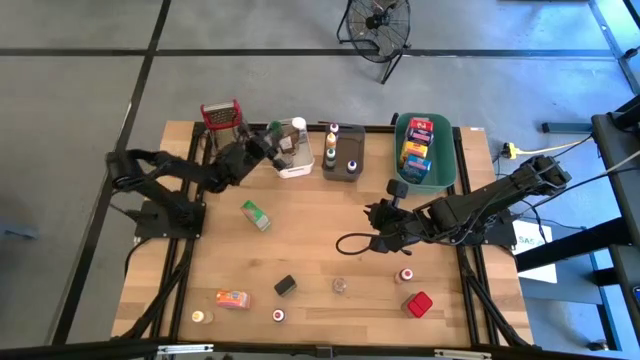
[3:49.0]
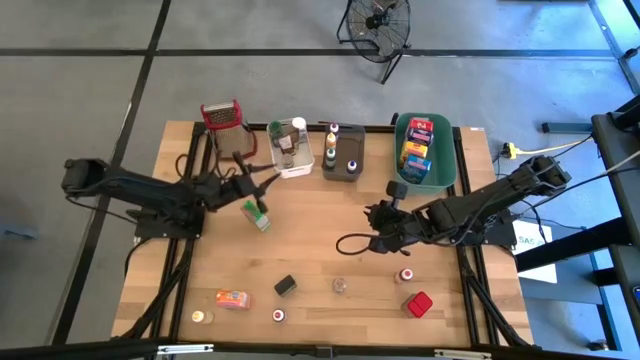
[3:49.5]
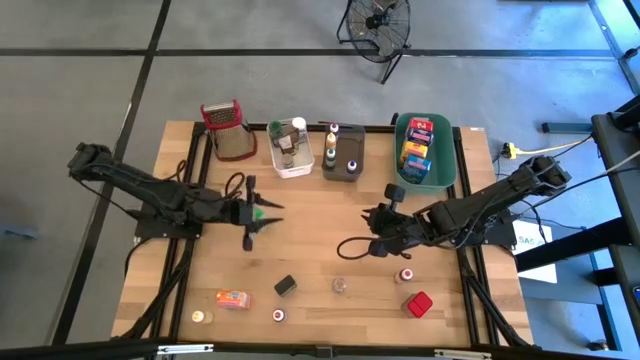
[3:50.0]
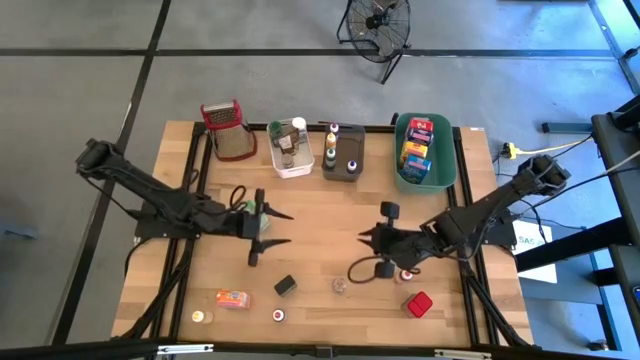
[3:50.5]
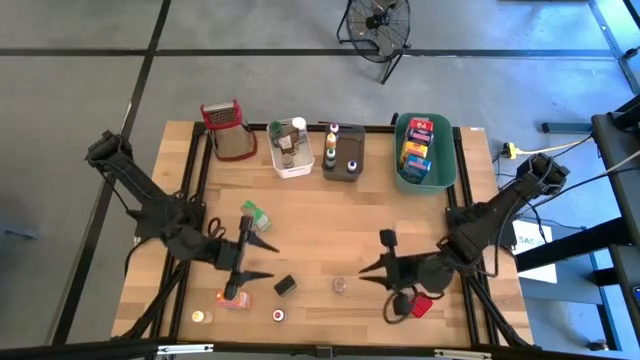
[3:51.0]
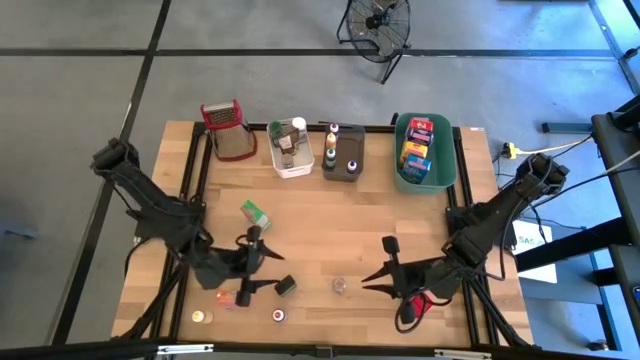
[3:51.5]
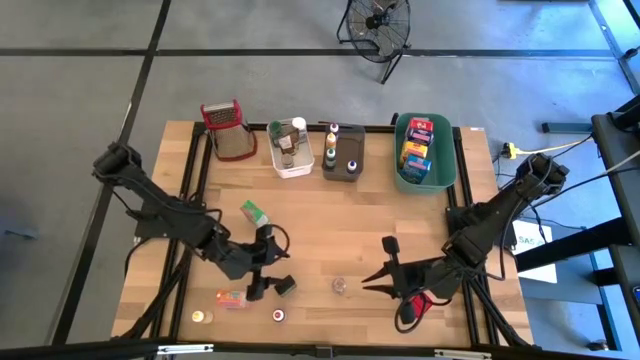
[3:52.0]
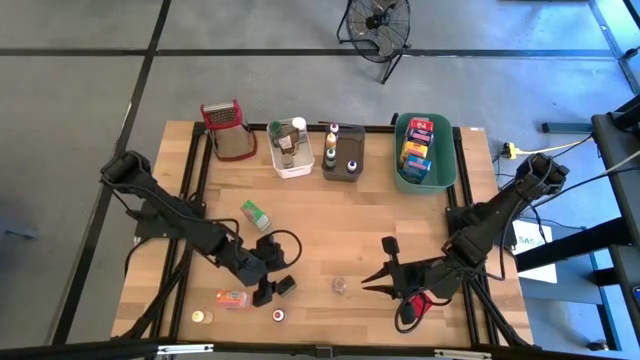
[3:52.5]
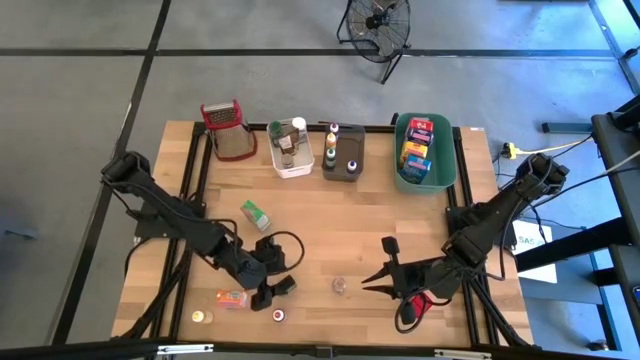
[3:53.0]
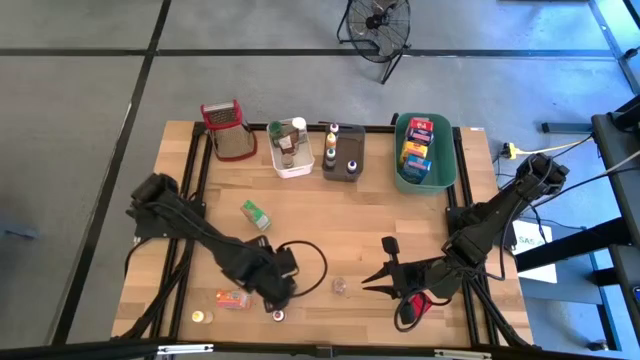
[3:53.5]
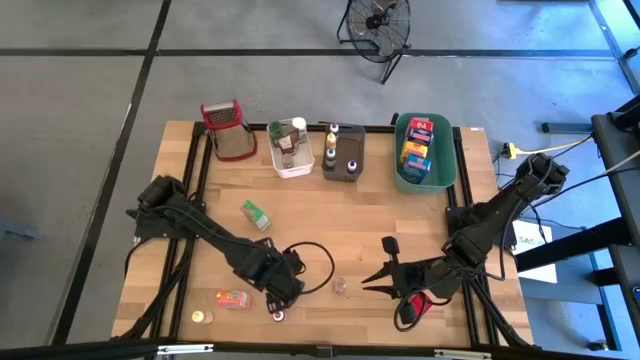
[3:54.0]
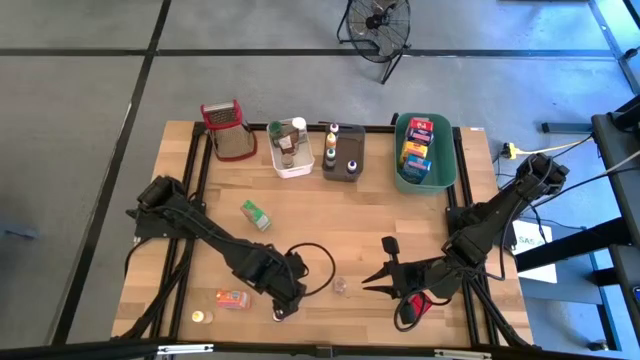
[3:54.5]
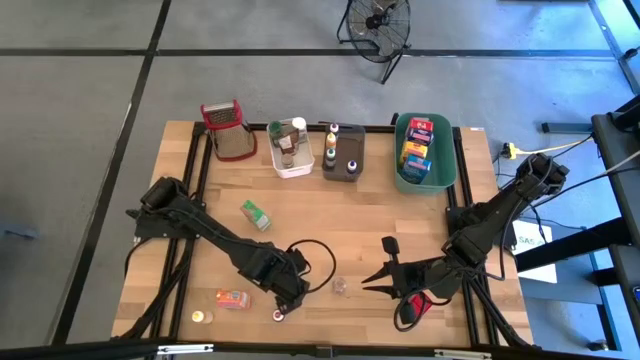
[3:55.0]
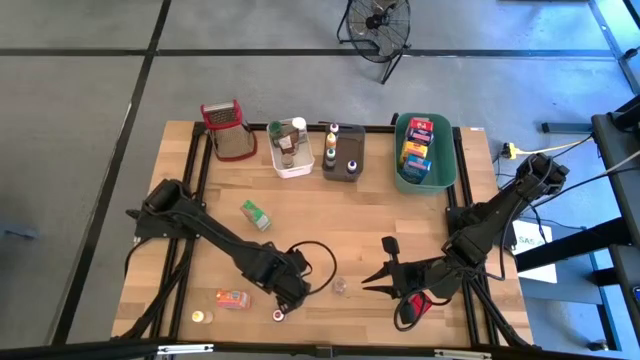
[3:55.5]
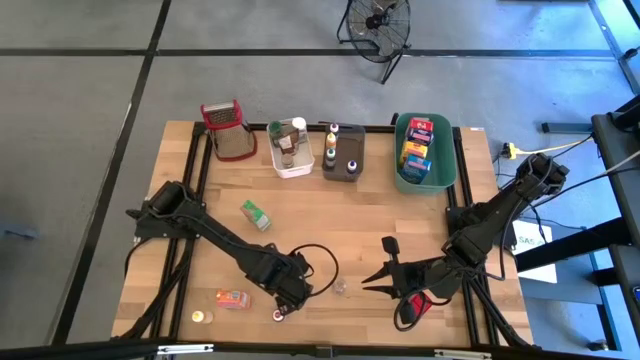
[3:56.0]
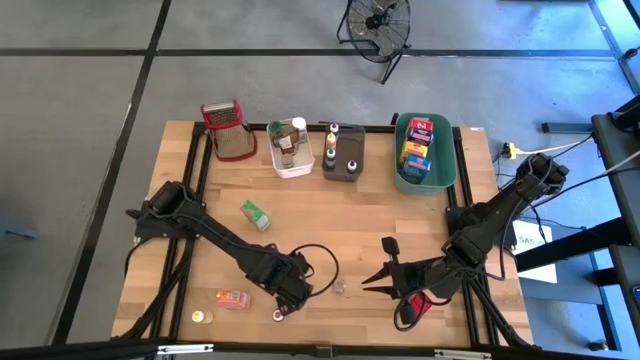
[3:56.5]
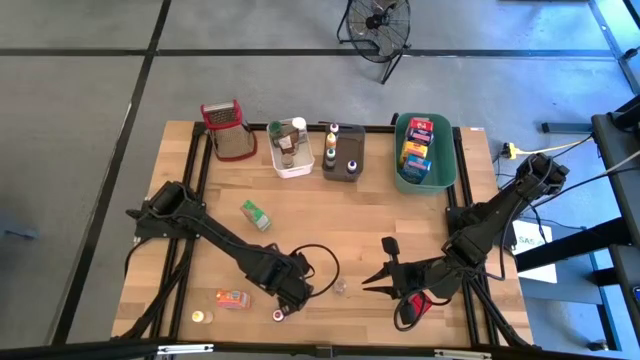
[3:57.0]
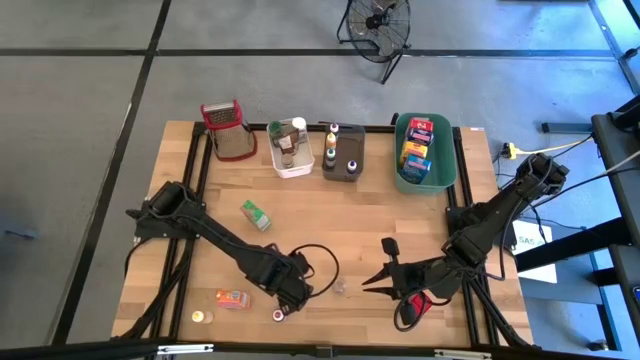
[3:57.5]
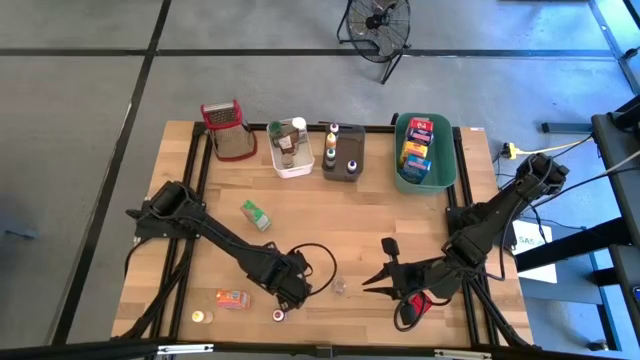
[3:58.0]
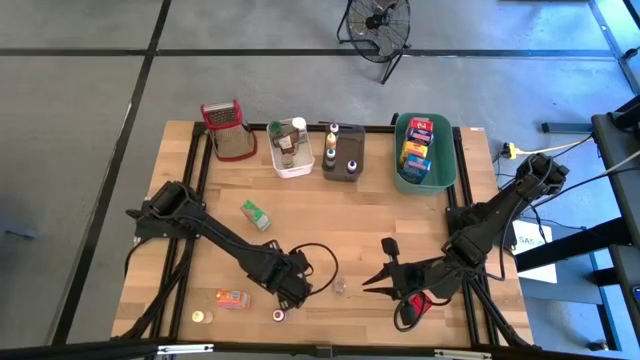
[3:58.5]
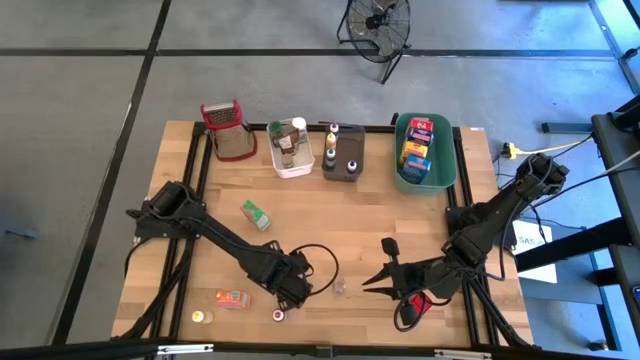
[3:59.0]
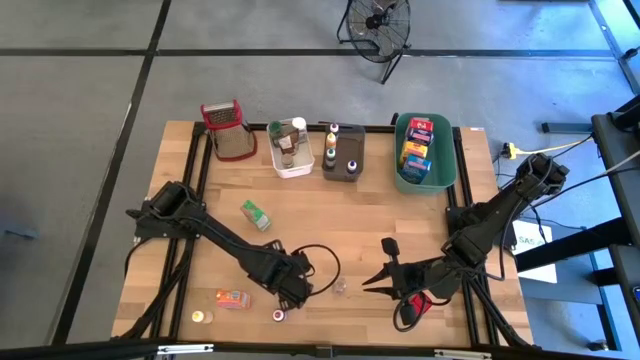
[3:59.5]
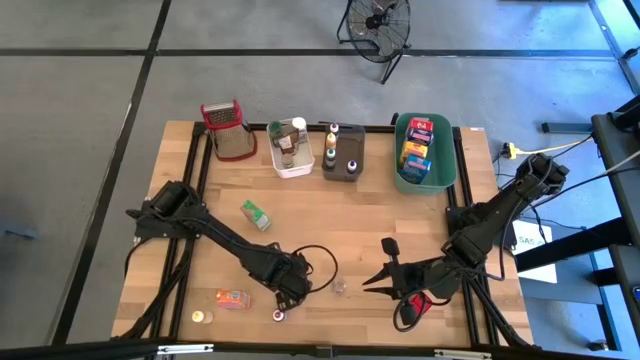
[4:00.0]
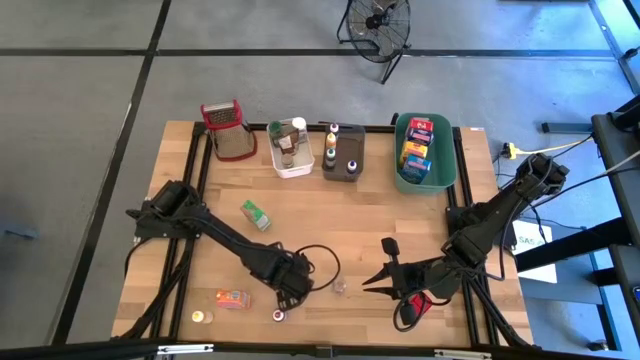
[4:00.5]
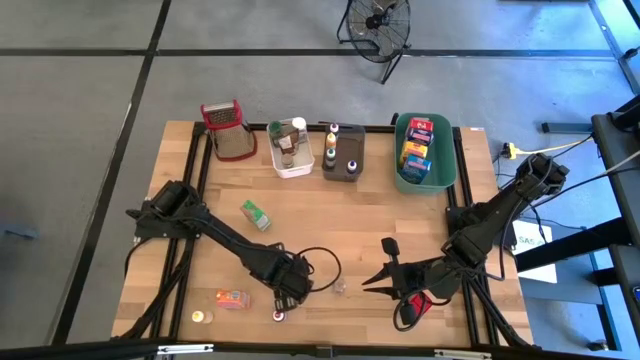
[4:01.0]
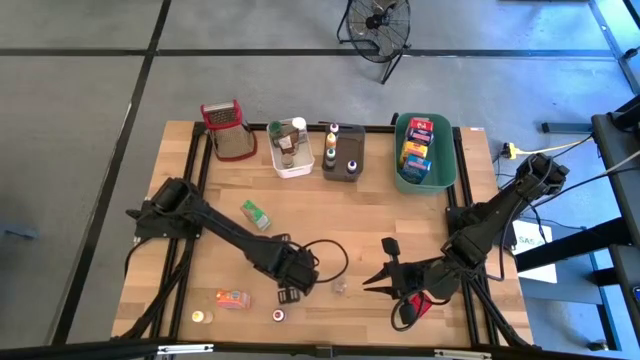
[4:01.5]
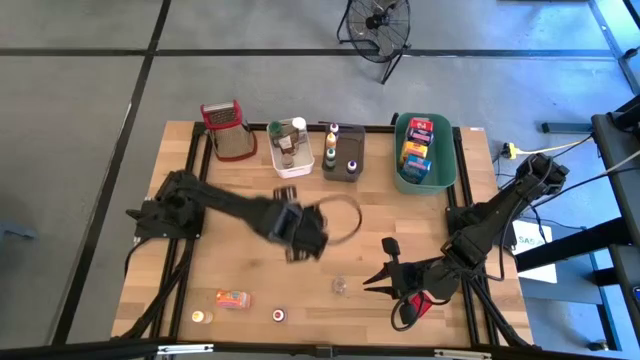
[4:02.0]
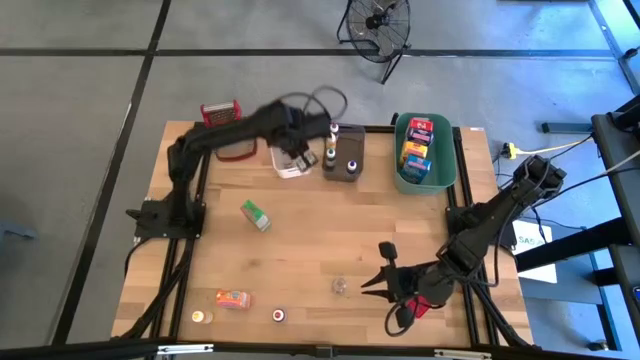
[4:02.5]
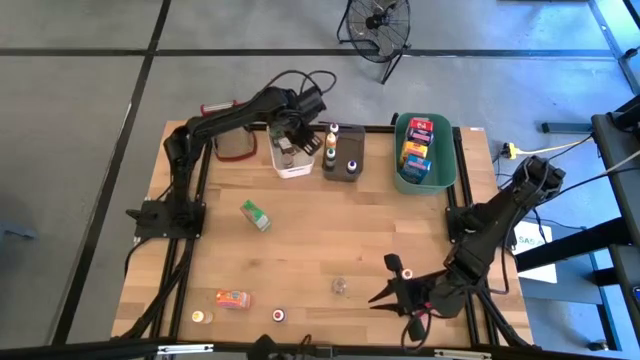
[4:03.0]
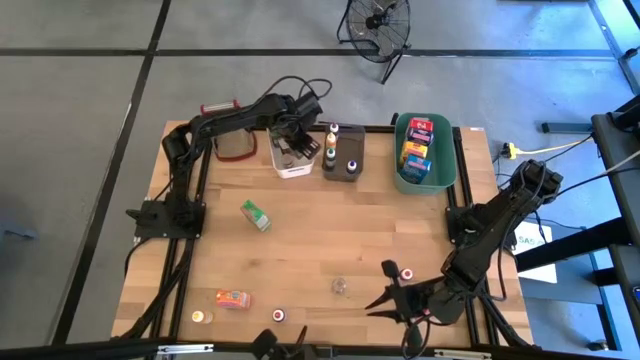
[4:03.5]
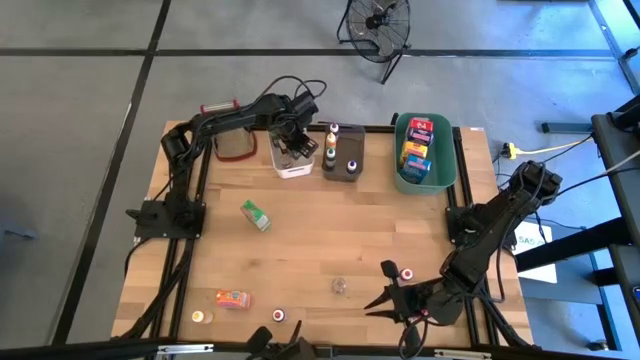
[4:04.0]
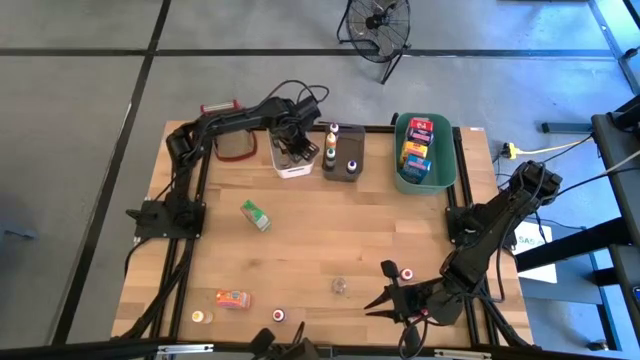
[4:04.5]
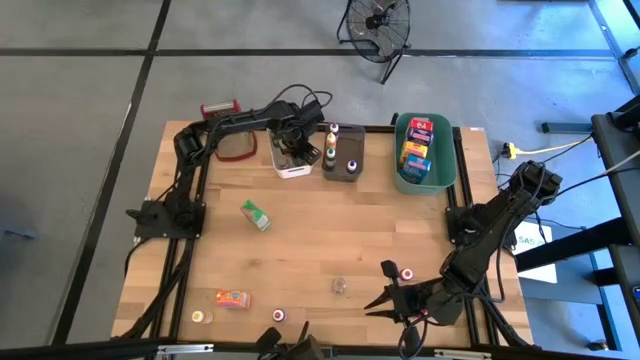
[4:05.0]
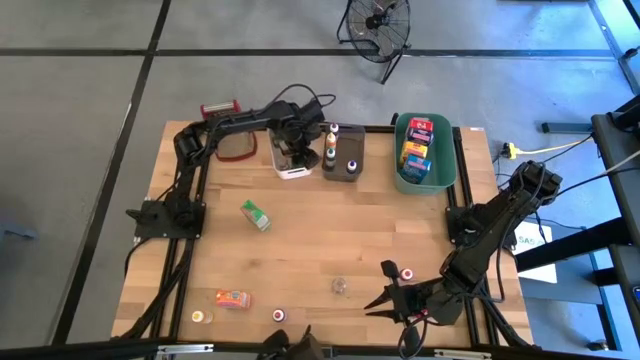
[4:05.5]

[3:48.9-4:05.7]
Task: Pick & Place Kitchen Items
Put the green seasoning bottle into the white bin

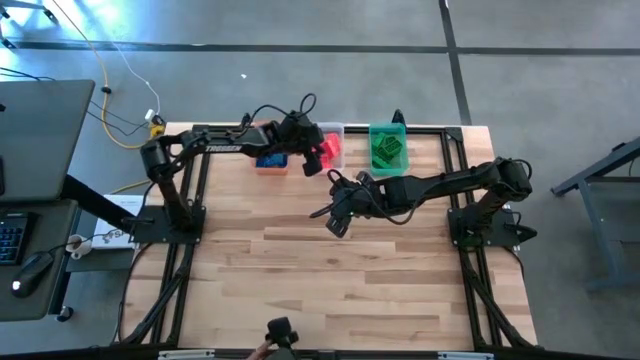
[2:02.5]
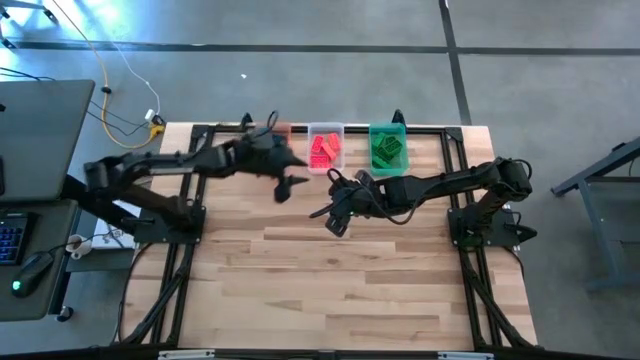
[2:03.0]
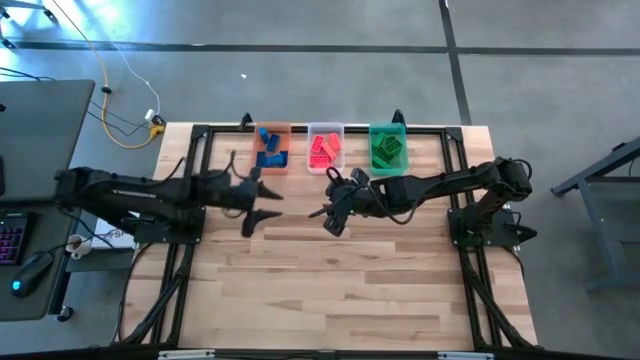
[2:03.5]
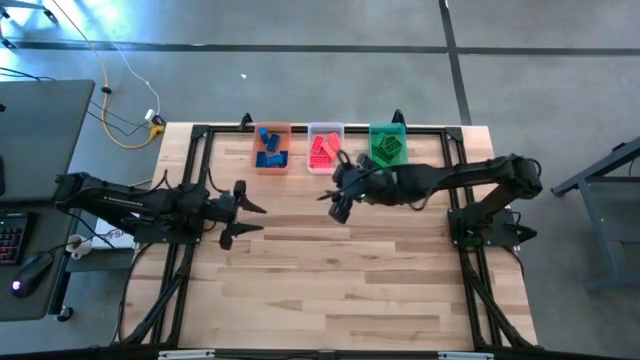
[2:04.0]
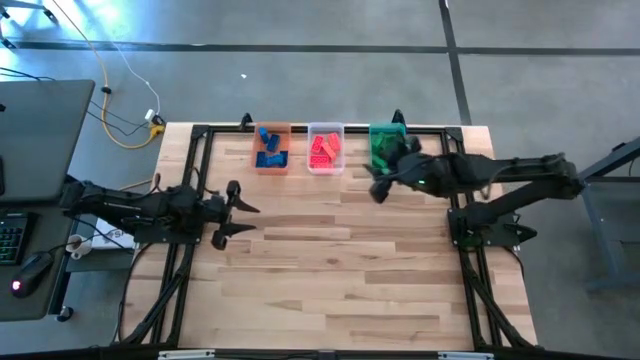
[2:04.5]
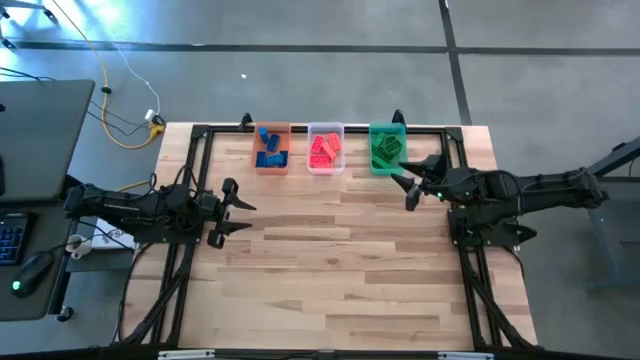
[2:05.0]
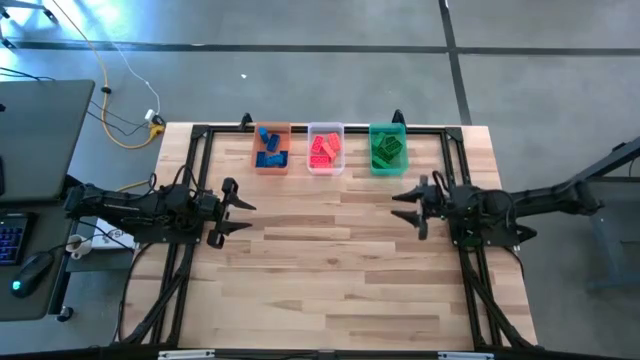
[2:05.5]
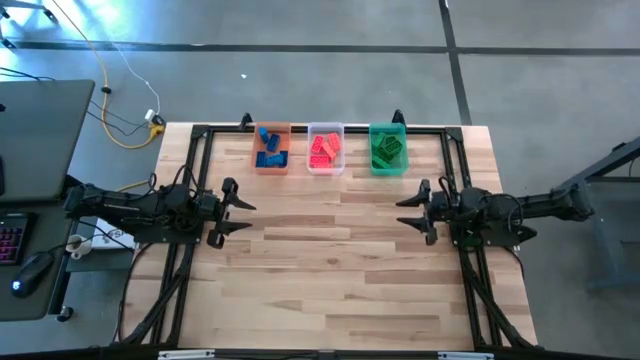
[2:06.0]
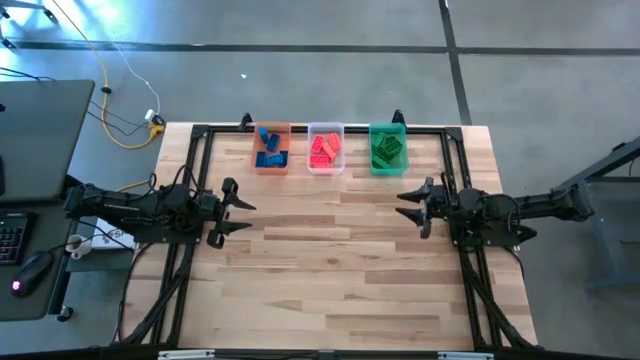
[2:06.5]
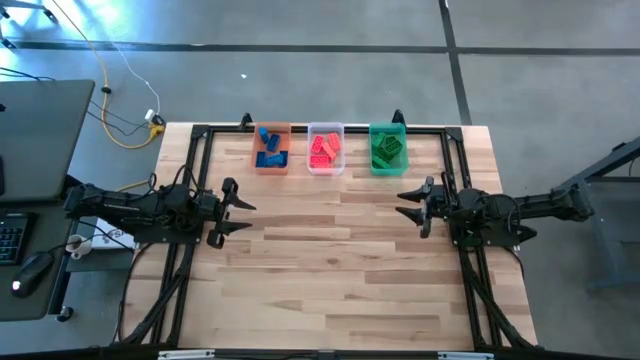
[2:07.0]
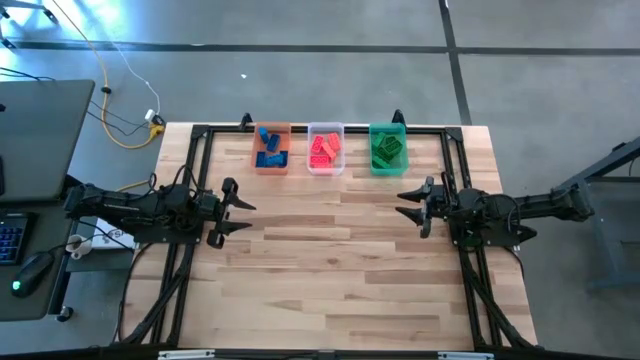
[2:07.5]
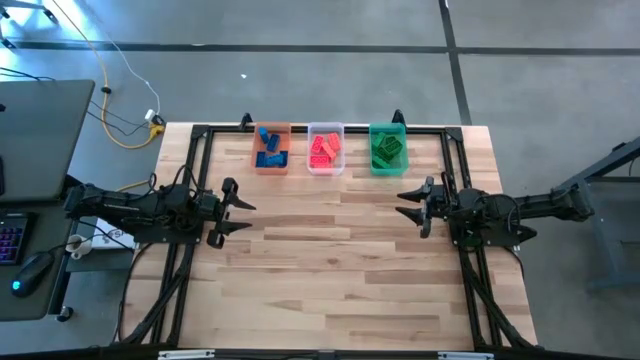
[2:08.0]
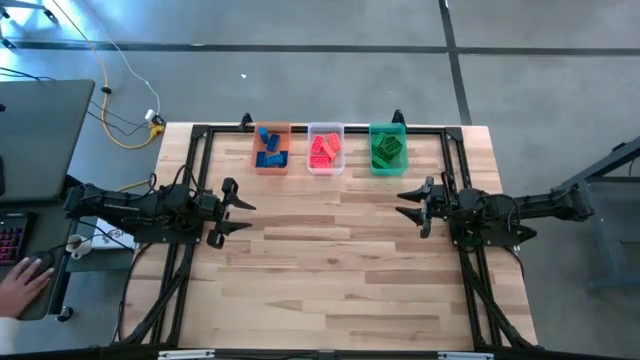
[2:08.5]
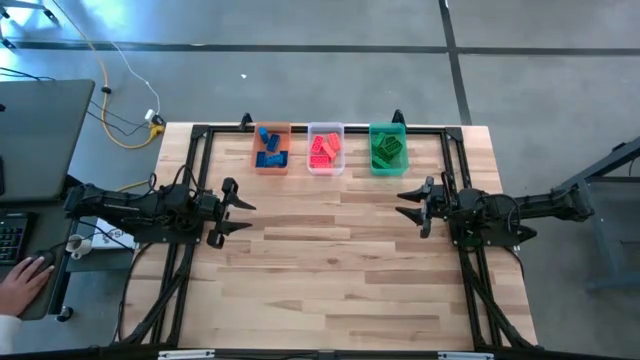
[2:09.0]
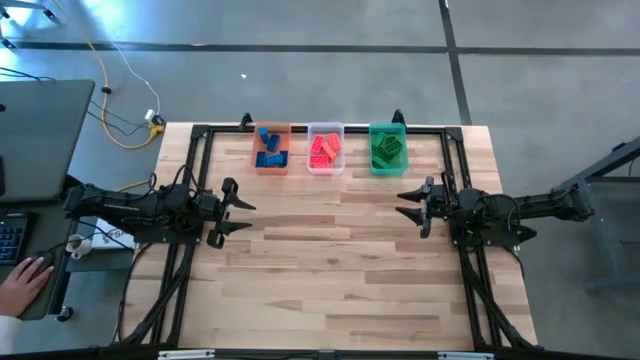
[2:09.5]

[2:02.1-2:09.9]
Task: Sort & place blocks by color
Return to Home Position
